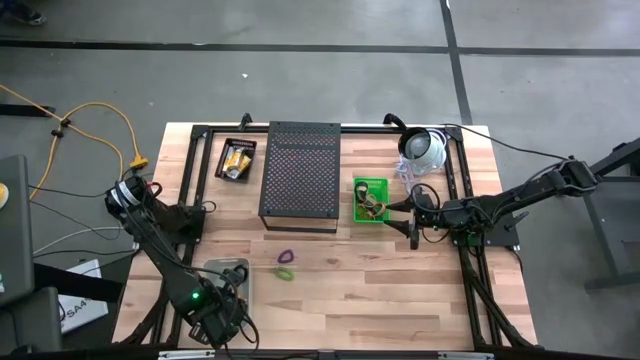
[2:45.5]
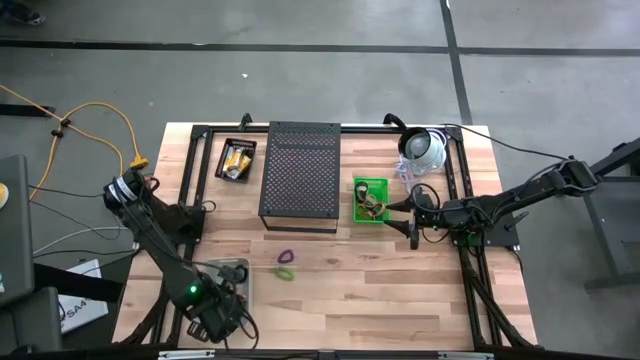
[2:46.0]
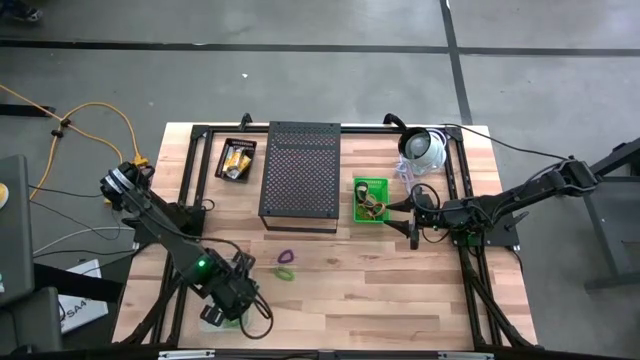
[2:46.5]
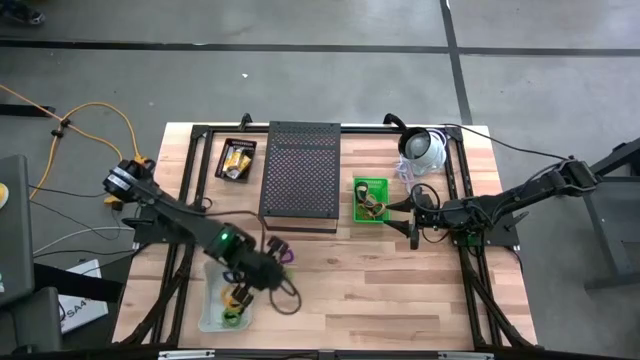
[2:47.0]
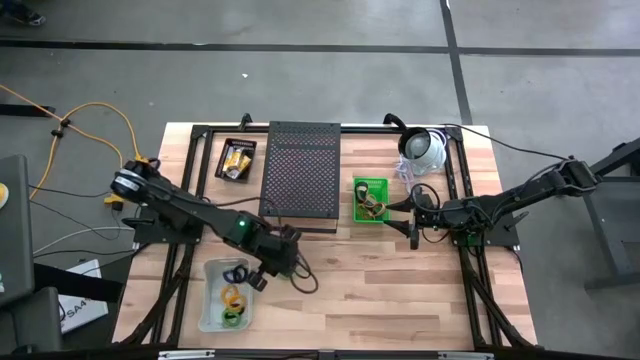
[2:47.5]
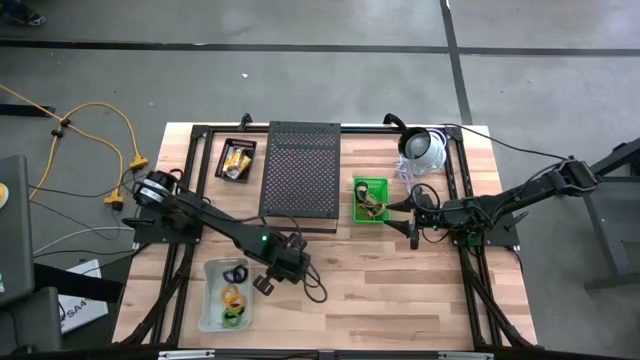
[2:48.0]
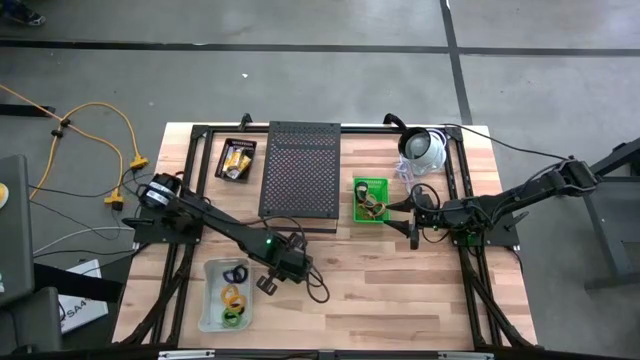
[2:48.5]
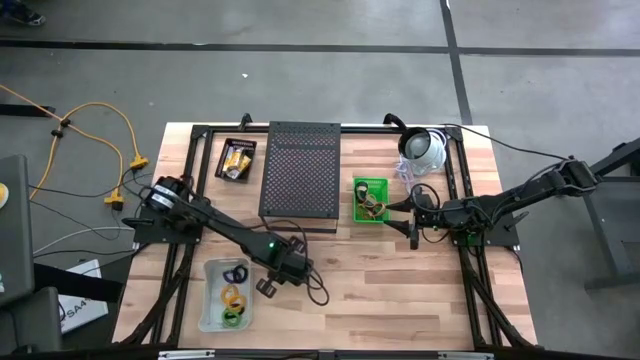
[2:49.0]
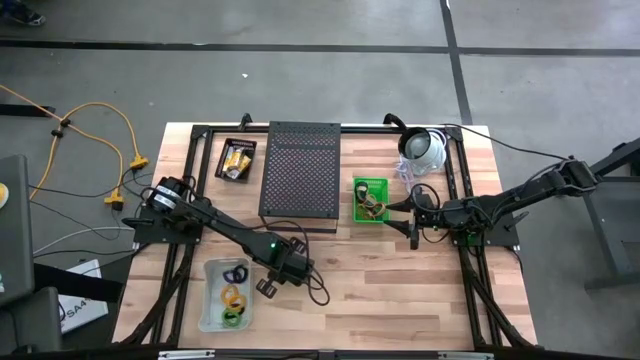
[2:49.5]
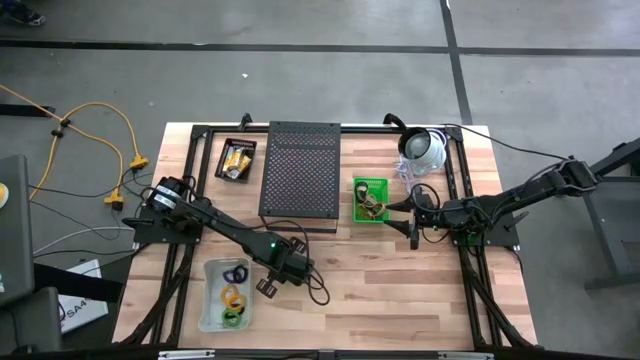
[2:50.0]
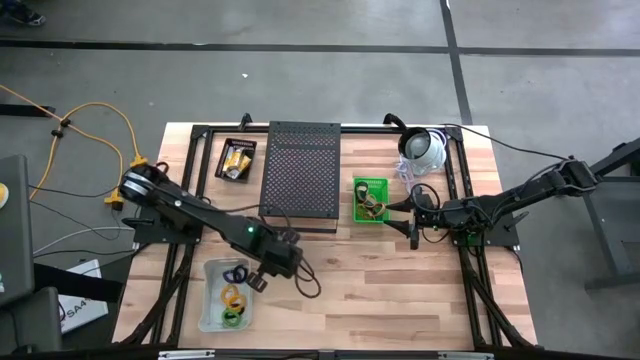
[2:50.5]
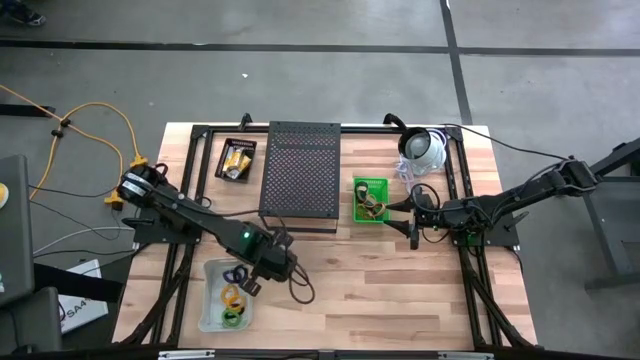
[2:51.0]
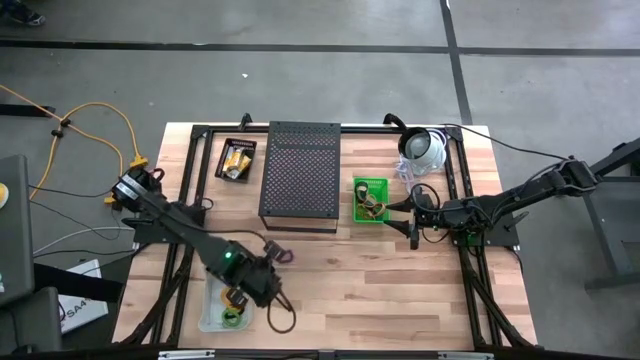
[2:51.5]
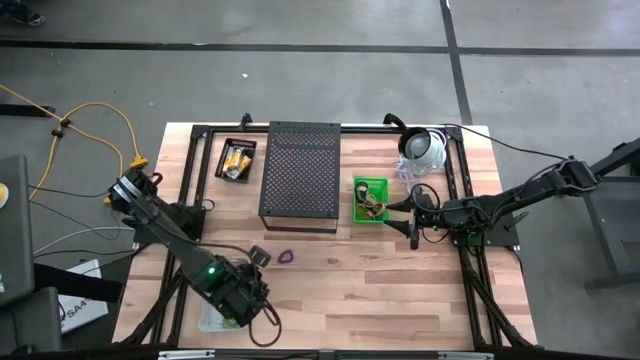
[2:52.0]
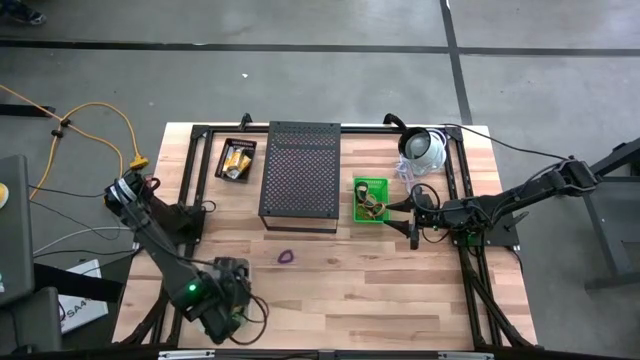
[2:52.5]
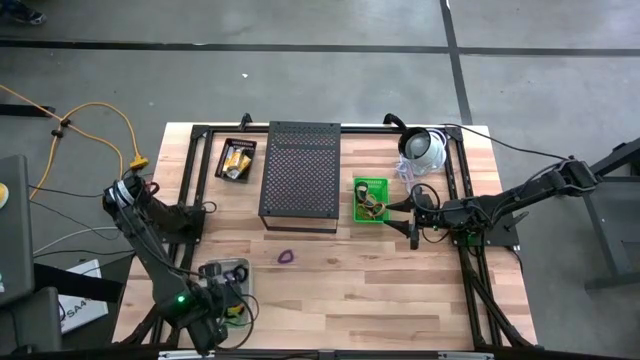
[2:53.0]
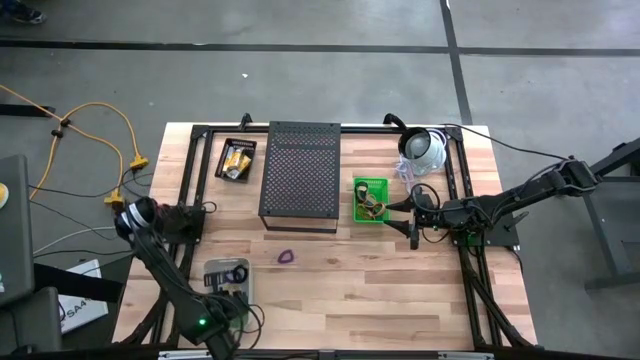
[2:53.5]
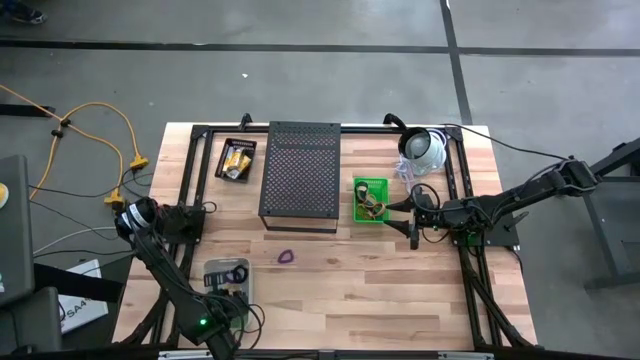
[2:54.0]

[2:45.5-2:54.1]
Task: Pick & Place Office Desk Supplies
Put the green spring keychain into the gray bin

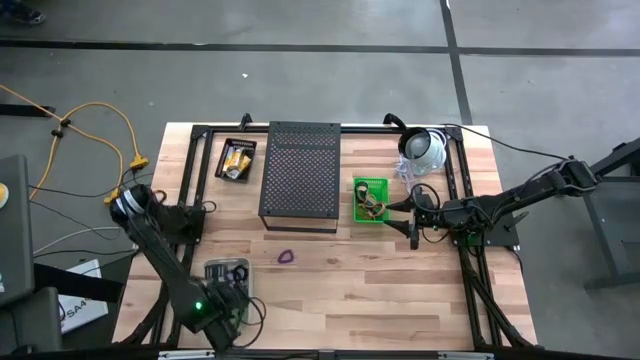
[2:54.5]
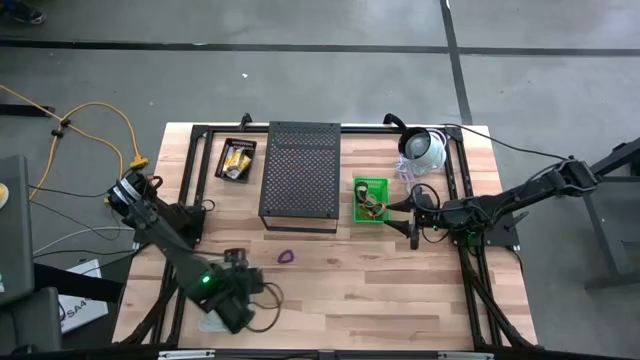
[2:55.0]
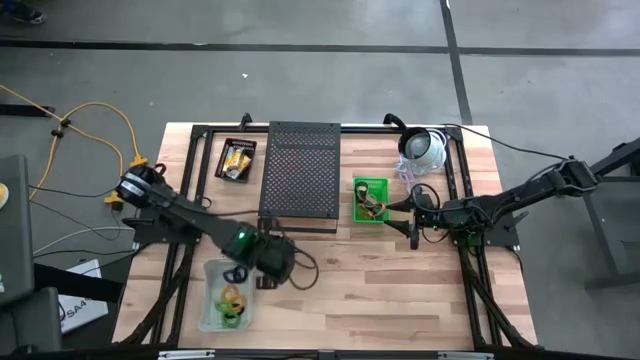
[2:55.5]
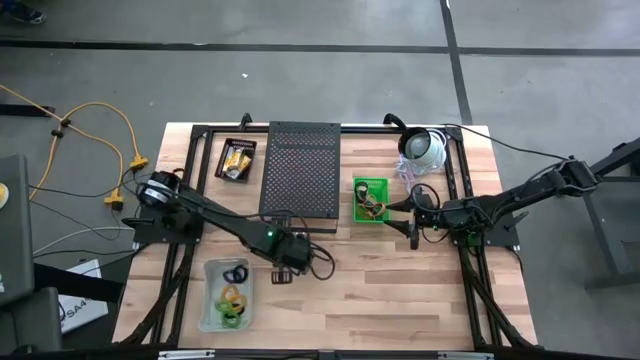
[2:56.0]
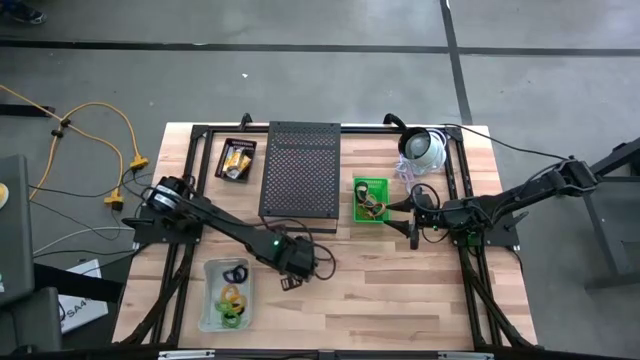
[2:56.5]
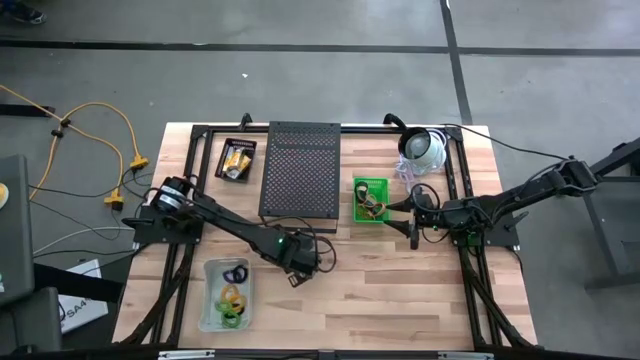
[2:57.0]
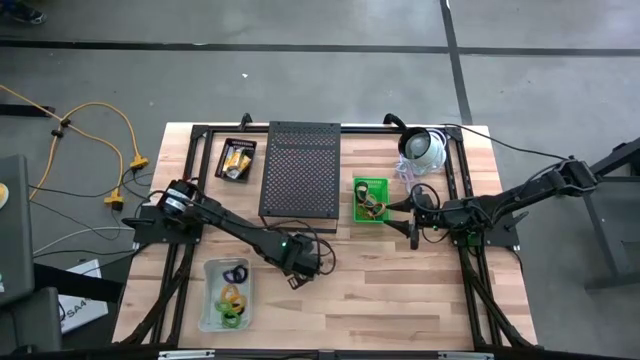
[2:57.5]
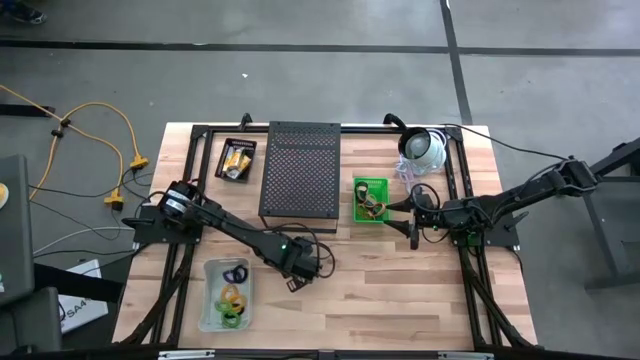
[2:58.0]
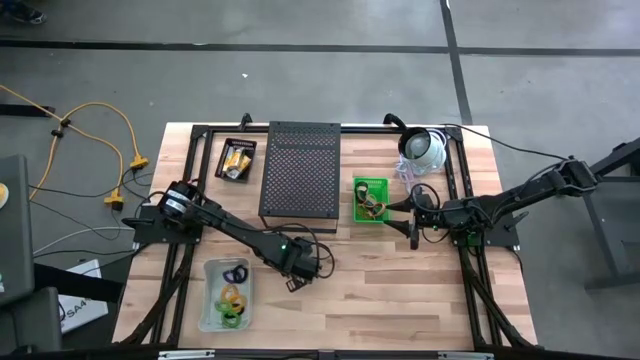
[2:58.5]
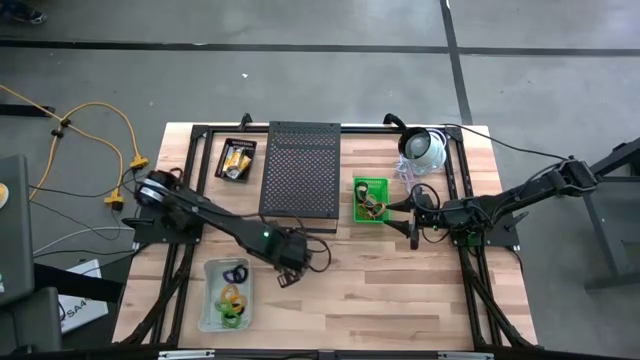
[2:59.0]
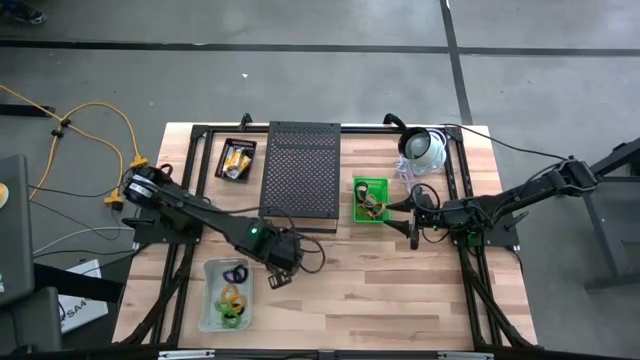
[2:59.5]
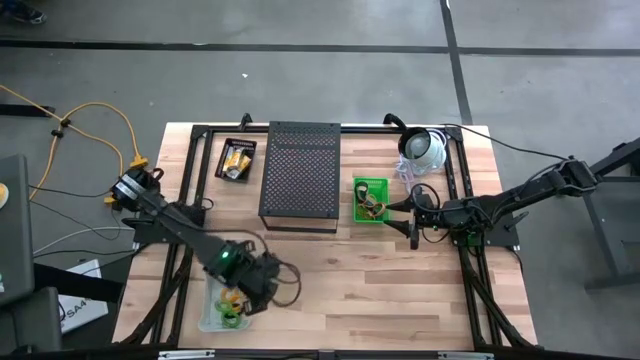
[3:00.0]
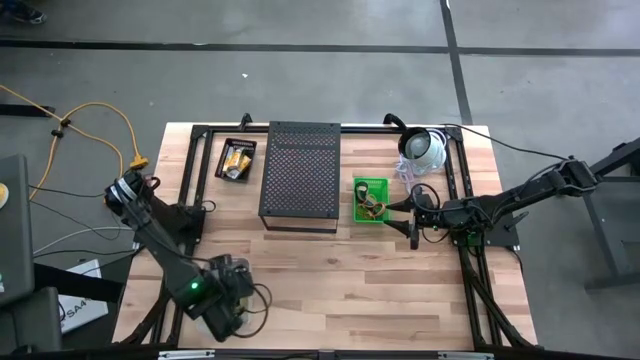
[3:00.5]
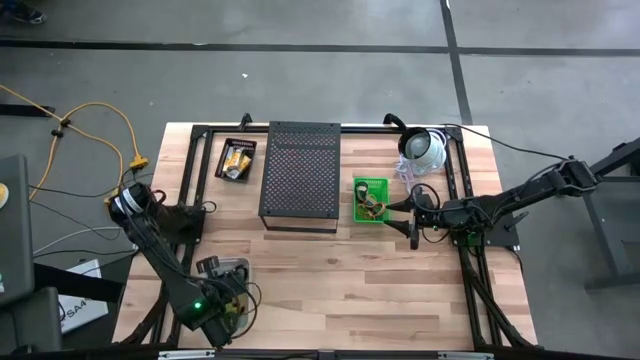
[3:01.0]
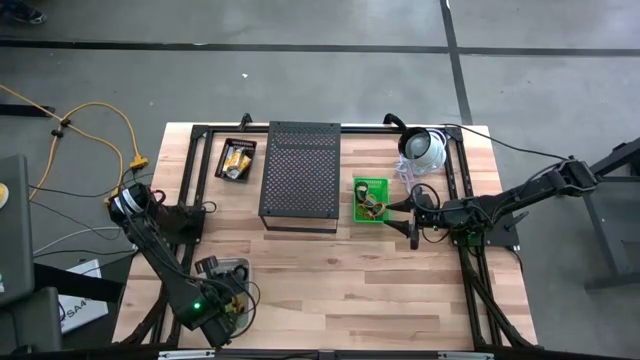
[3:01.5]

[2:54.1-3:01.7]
Put the purple spring keychain into the gray bin

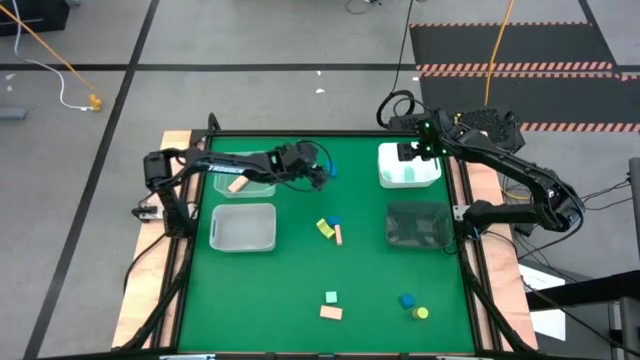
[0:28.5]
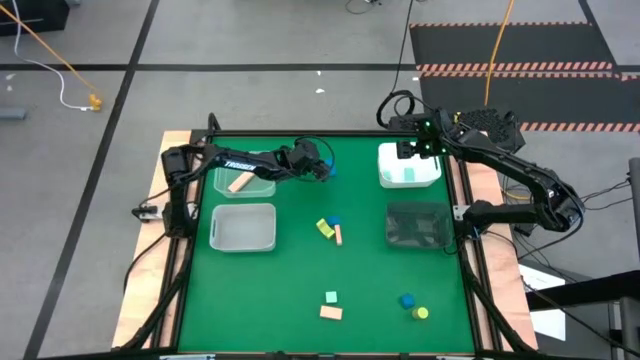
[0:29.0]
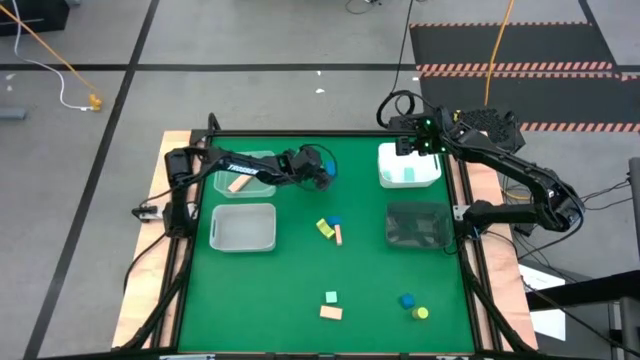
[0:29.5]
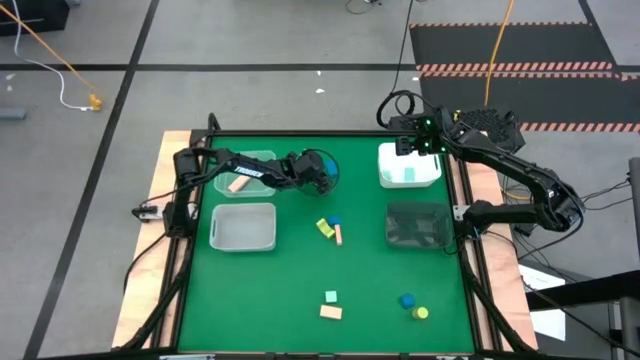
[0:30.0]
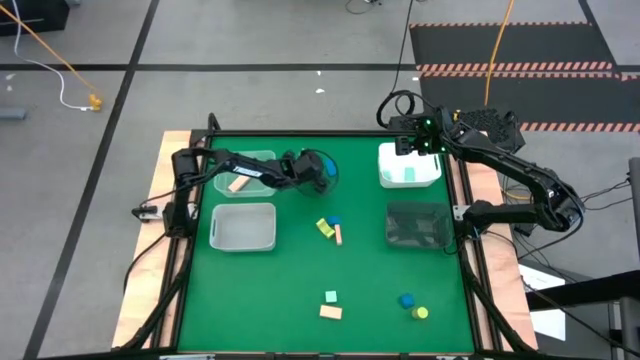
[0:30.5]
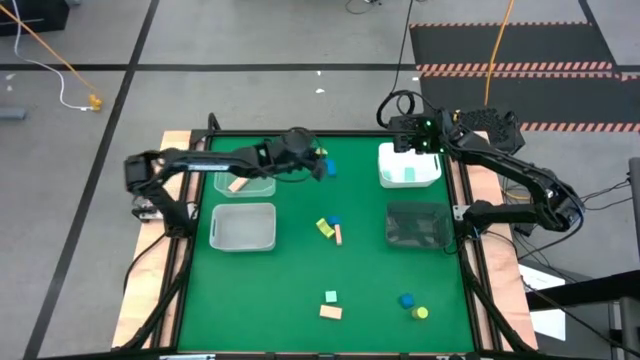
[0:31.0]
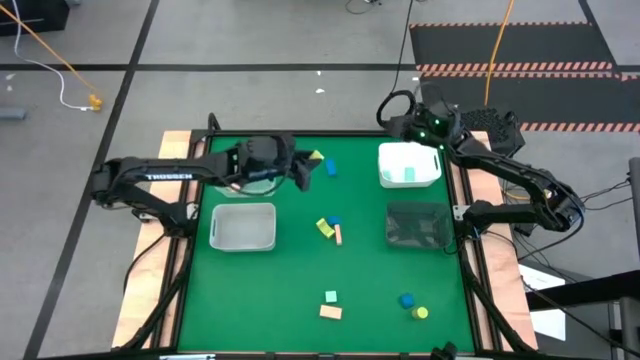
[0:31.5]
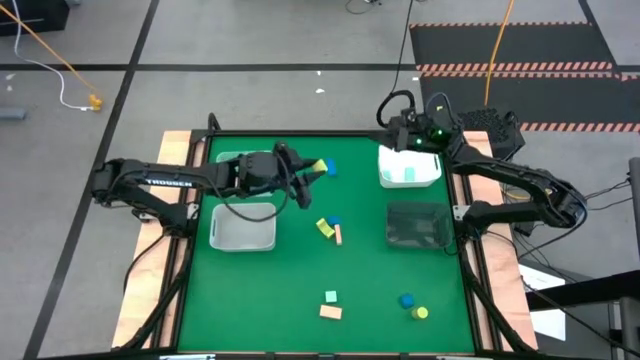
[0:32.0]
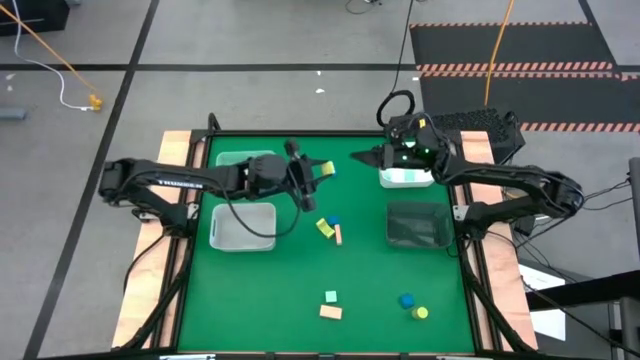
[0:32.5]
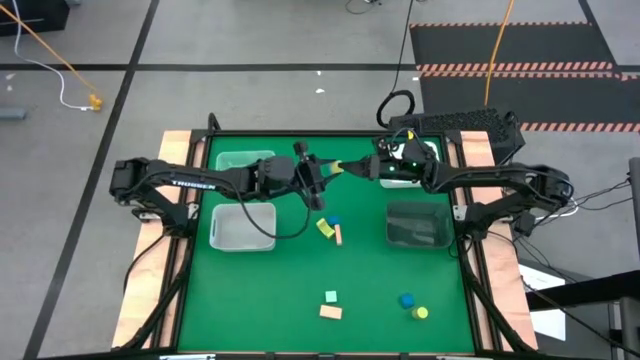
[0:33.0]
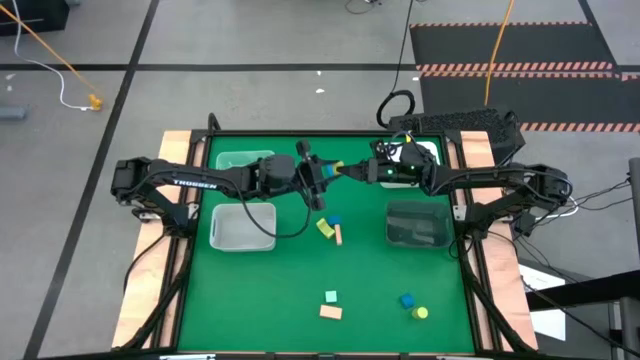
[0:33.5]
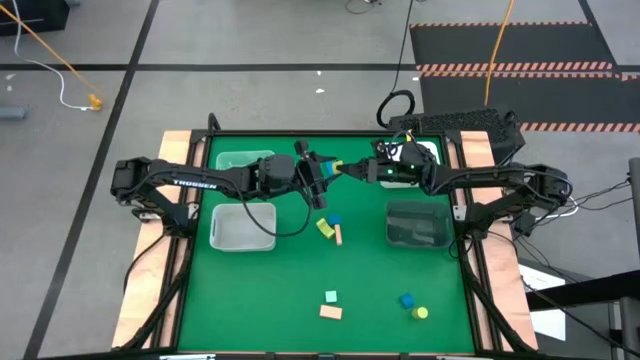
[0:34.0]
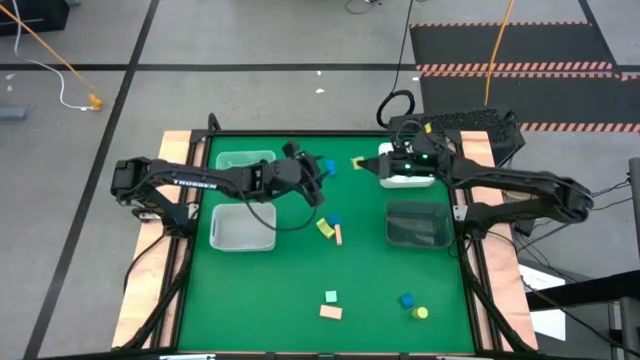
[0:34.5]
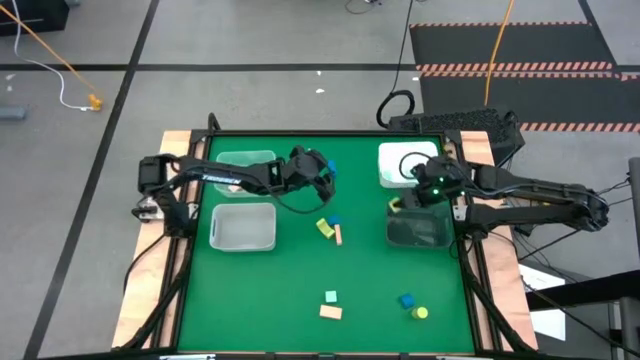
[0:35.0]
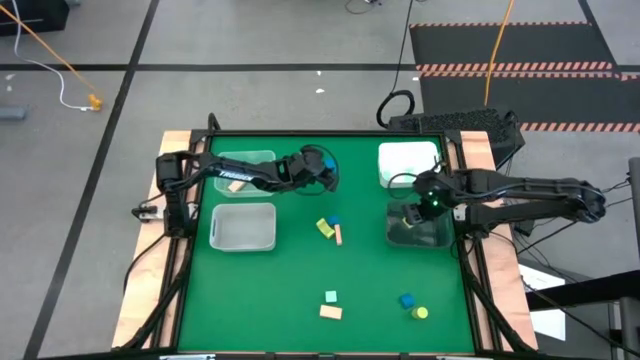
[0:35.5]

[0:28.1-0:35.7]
Task: Sort & place blocks by color
Put the top yellow block into the black transparent bin
